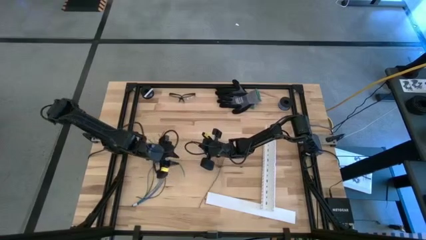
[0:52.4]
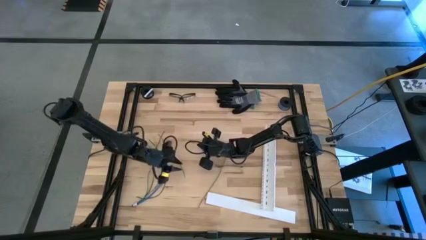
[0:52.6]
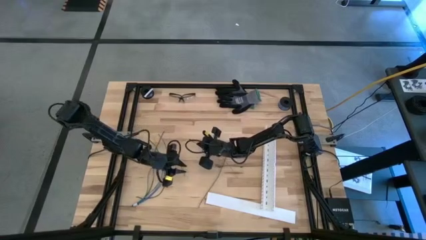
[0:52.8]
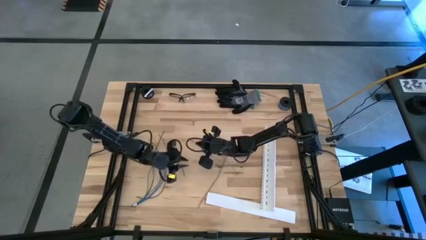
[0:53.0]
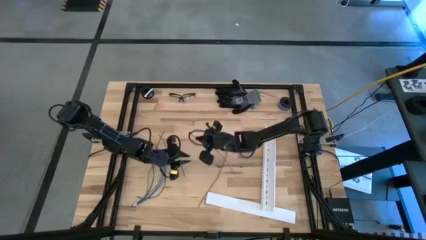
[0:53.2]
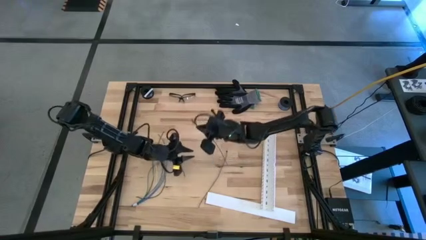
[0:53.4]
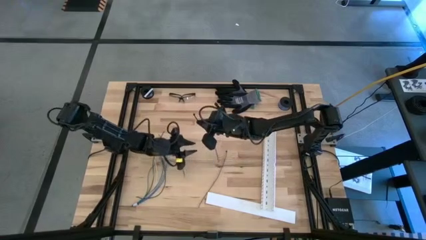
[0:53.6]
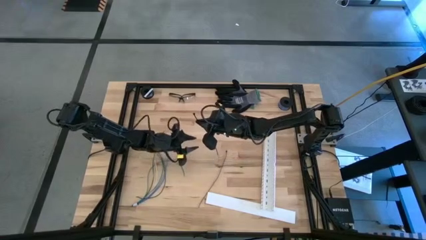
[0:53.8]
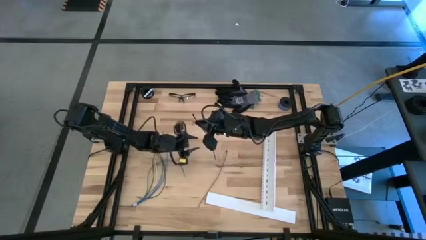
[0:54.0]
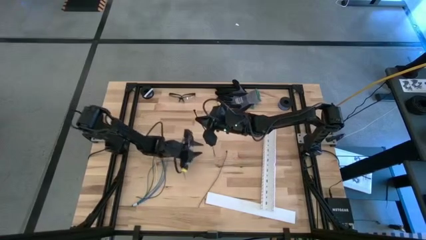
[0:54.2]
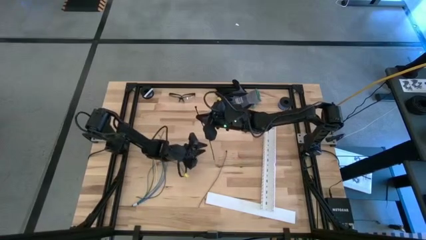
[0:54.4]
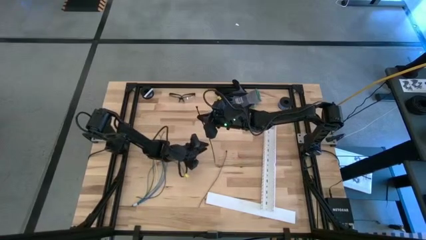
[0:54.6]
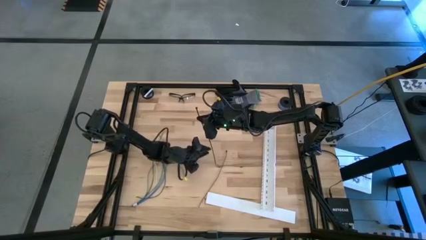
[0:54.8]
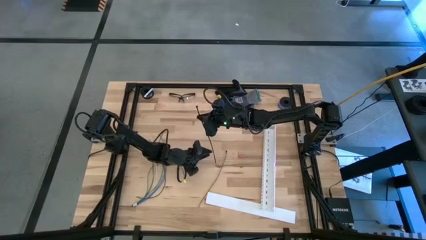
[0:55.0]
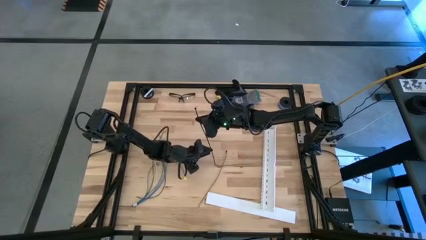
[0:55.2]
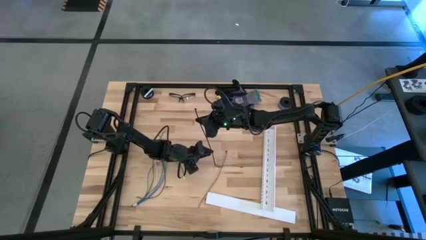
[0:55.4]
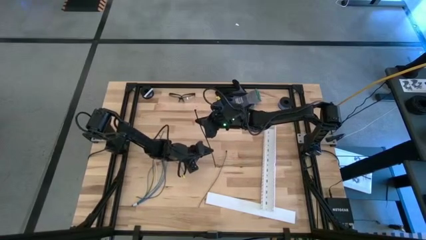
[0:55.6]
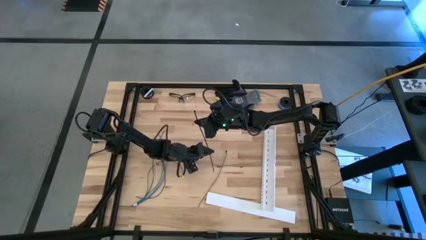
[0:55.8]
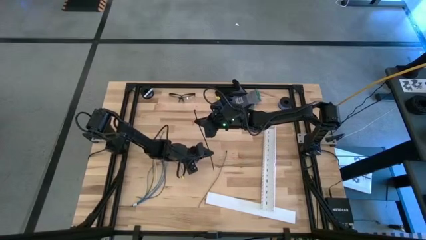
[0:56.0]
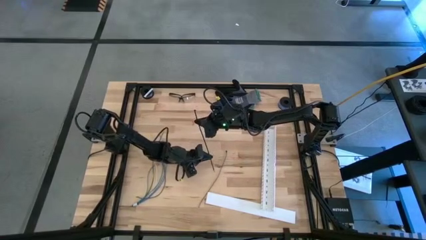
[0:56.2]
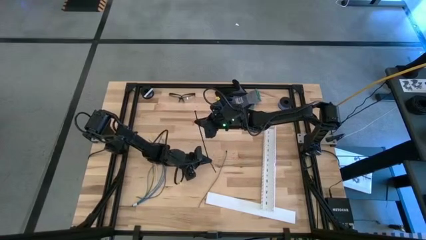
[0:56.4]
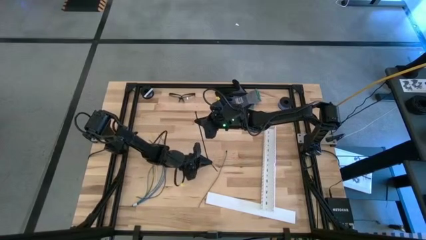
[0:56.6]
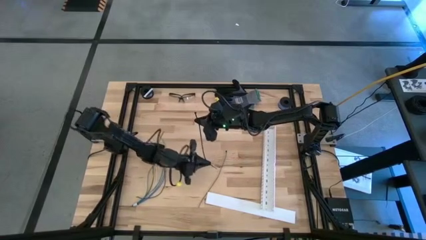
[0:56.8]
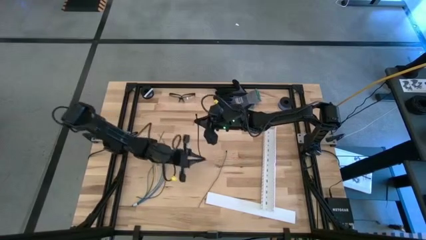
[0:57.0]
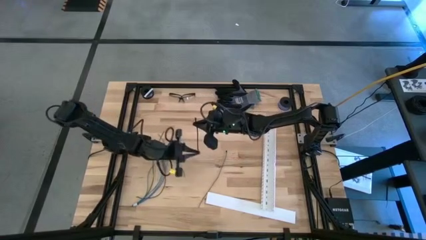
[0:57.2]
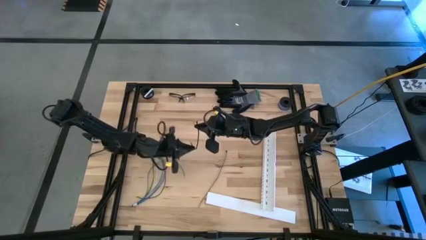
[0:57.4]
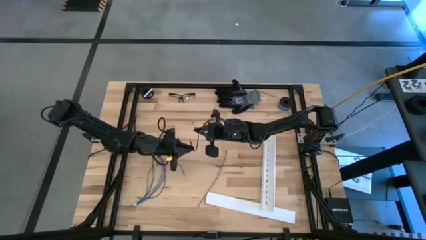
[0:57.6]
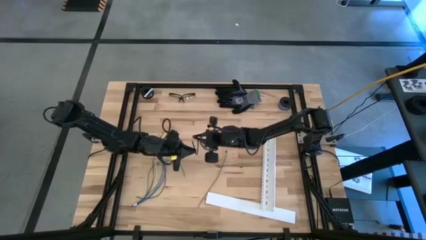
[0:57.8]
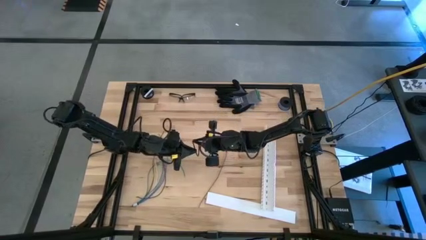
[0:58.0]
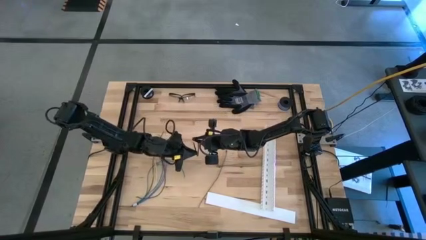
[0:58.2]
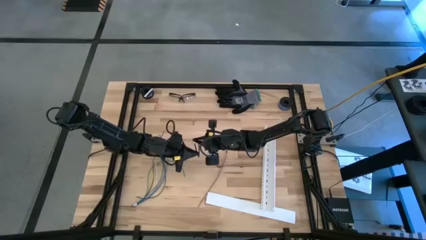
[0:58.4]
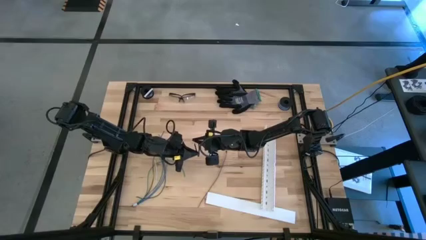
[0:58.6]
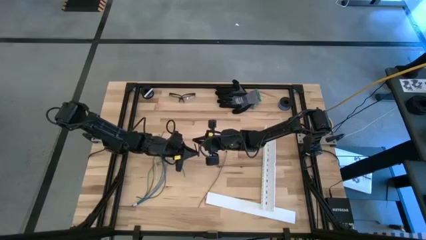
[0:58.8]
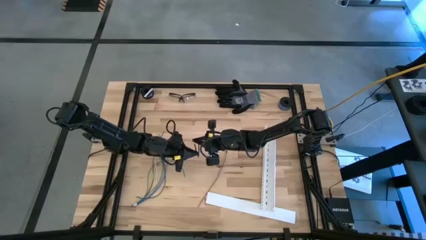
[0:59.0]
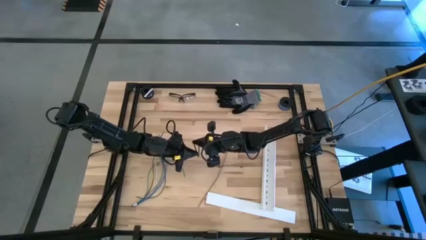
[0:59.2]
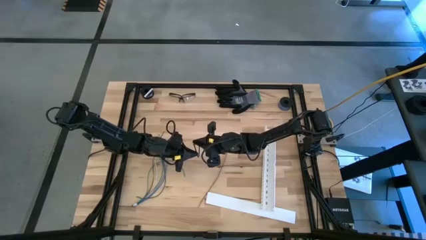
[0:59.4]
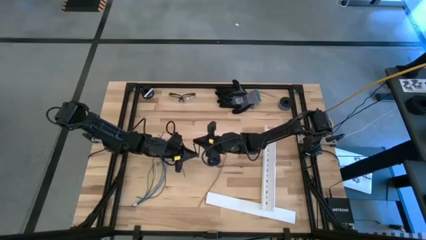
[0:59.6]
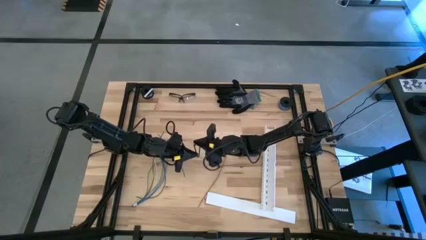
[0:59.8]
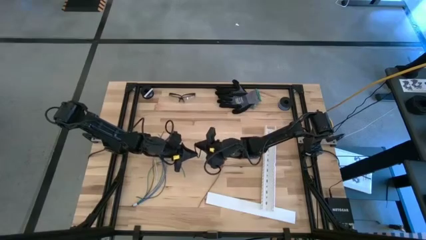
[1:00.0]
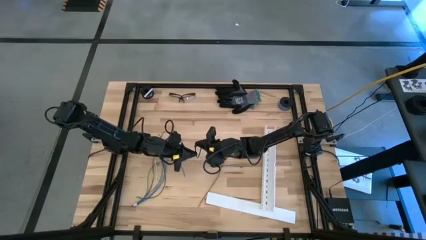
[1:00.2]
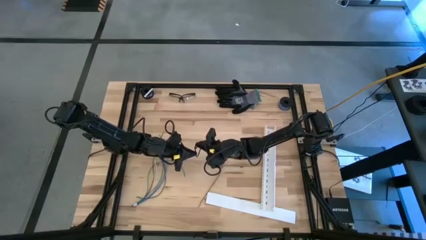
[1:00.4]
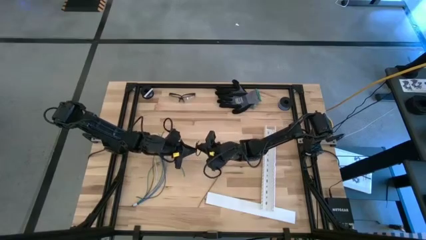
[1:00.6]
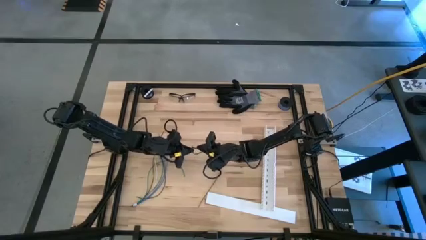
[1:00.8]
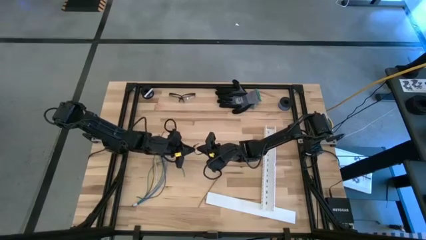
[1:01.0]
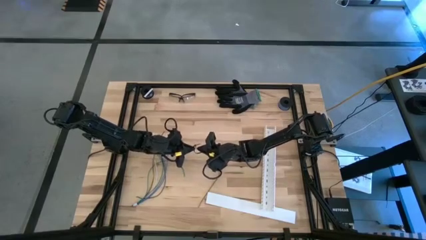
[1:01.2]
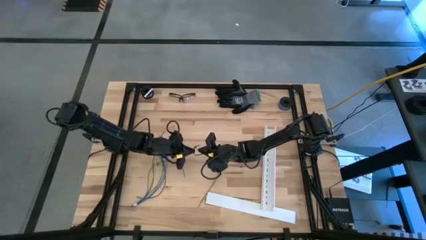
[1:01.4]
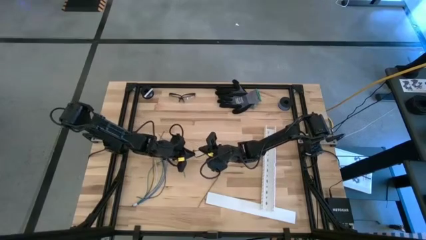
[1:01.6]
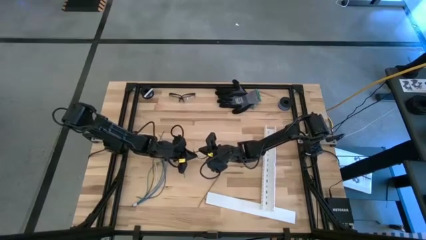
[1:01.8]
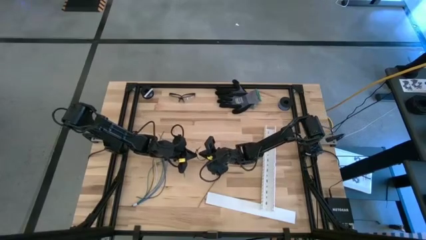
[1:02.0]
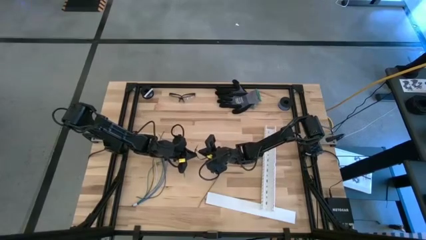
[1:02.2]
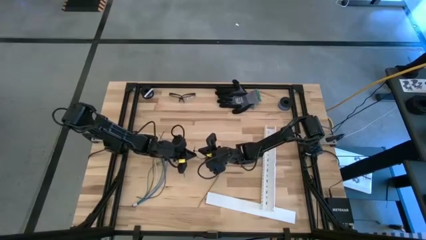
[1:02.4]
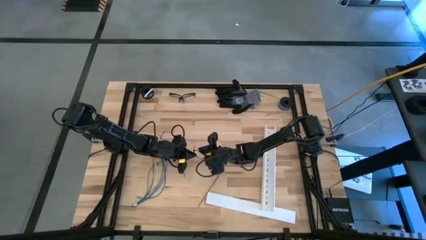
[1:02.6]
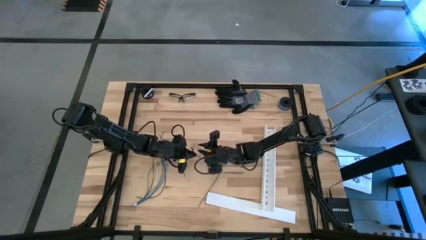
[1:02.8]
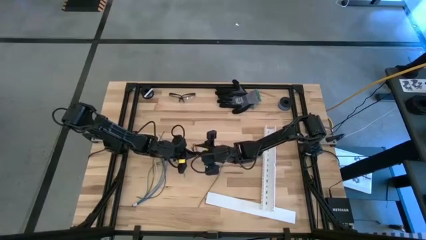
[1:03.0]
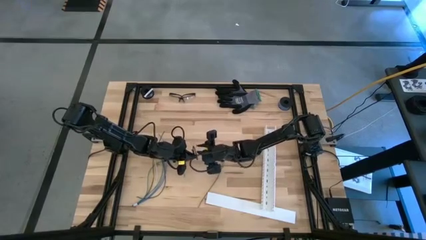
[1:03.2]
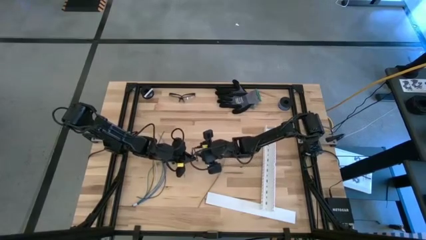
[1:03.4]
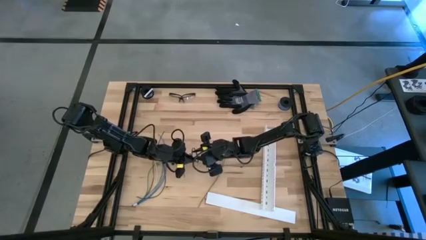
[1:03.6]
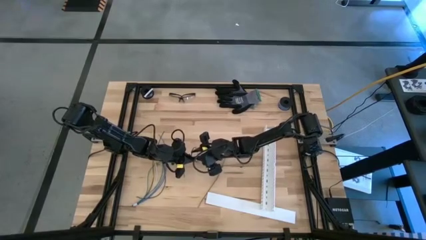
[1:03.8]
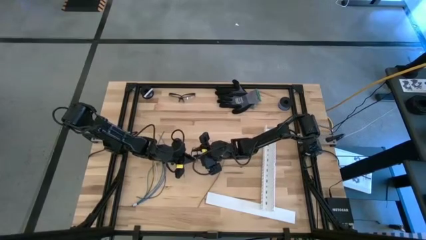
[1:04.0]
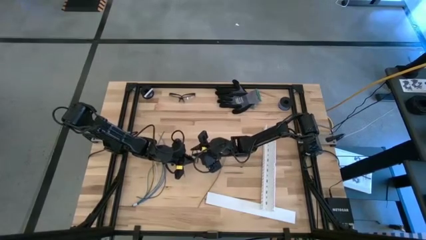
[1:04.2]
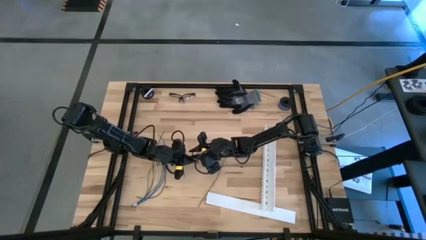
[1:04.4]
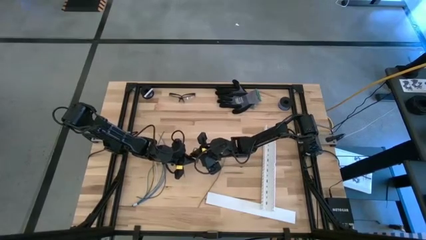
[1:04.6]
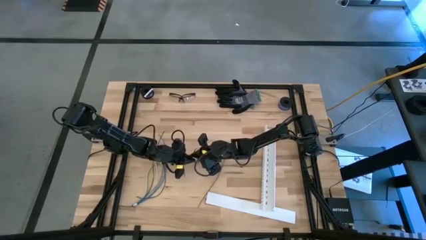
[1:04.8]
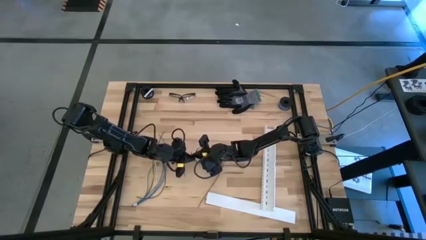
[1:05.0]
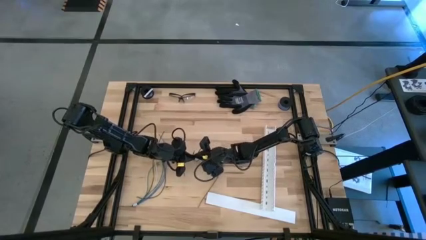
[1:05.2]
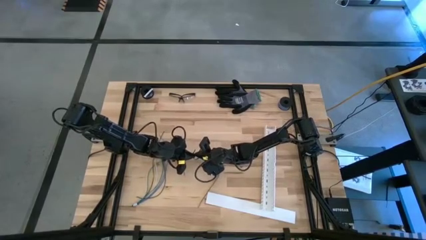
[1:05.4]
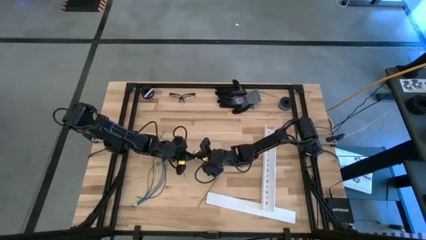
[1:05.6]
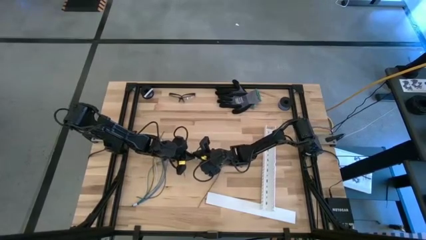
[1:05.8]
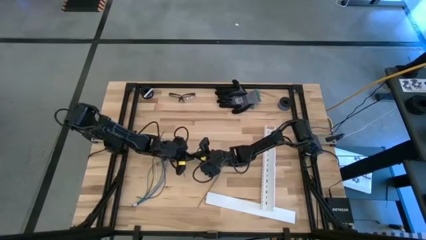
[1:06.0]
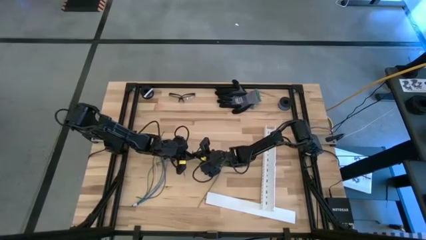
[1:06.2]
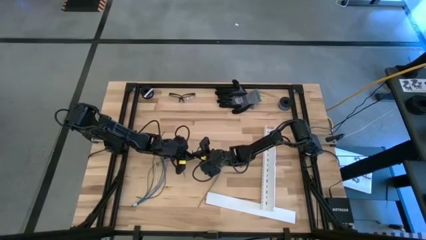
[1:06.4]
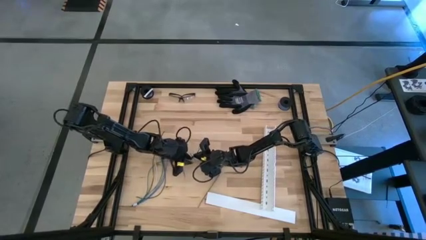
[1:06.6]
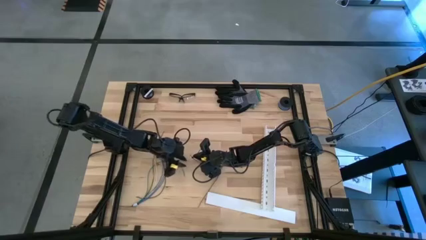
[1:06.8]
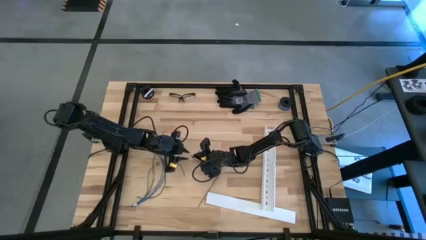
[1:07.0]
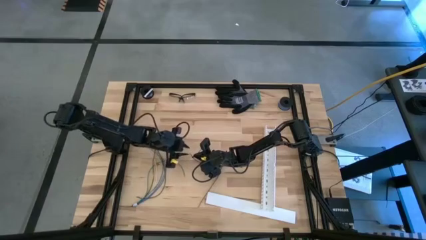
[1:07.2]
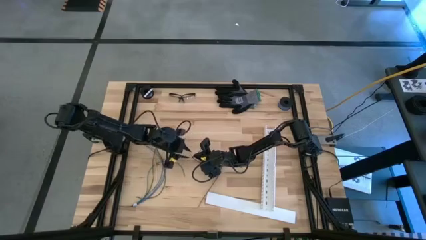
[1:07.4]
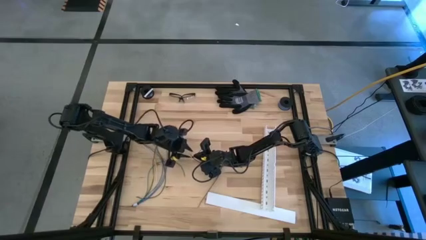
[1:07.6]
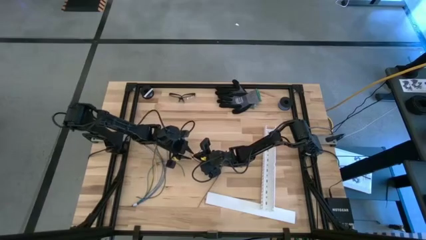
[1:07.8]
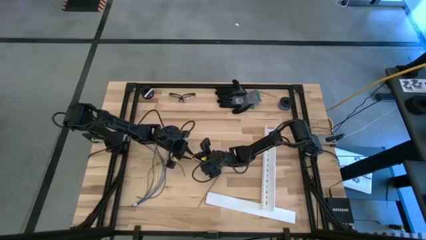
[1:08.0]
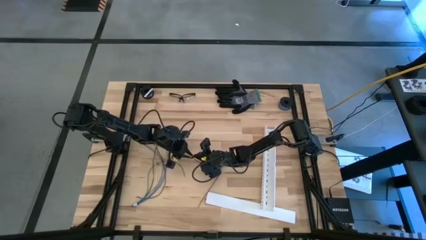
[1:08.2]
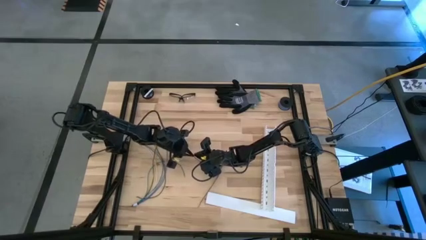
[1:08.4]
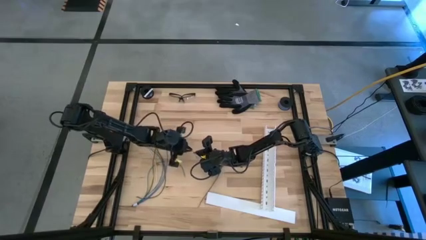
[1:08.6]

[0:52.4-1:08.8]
Task: Ziptie cables
Wrap the cable wires with the black zip tie
